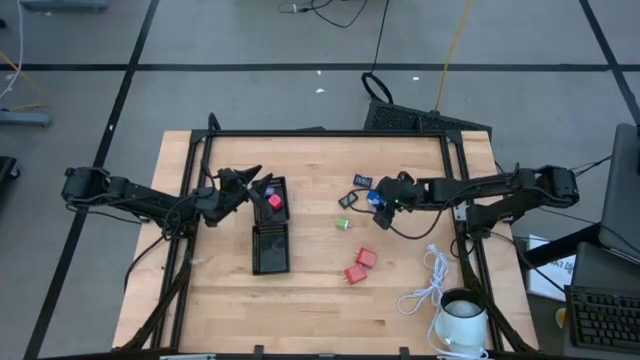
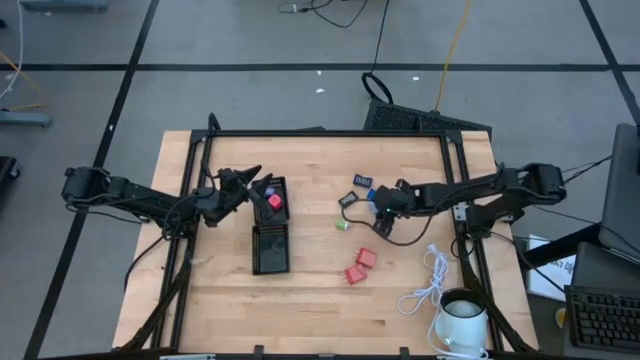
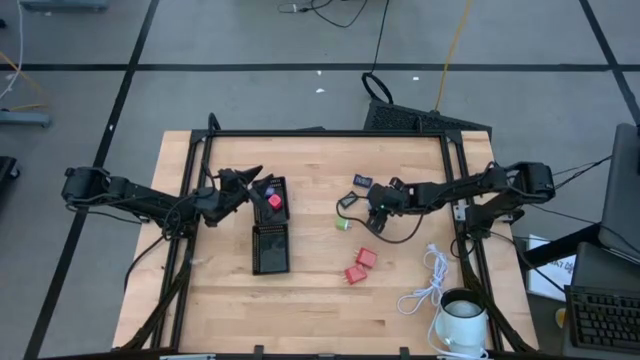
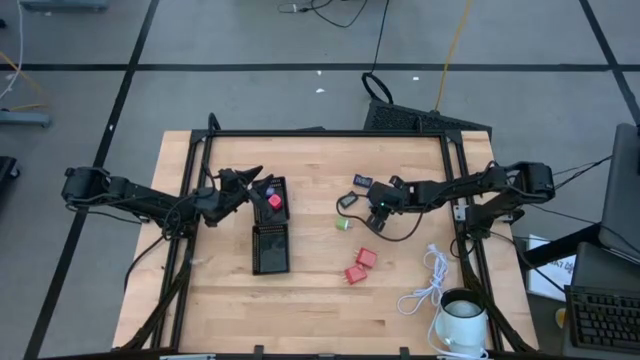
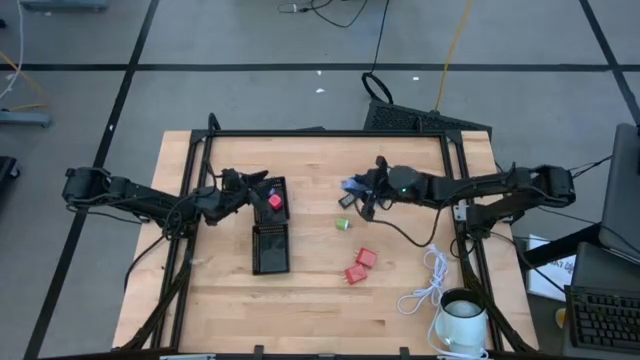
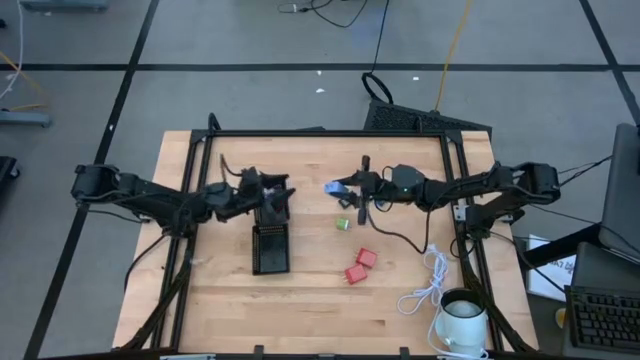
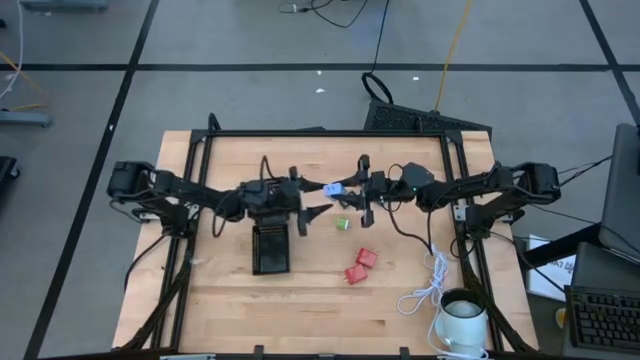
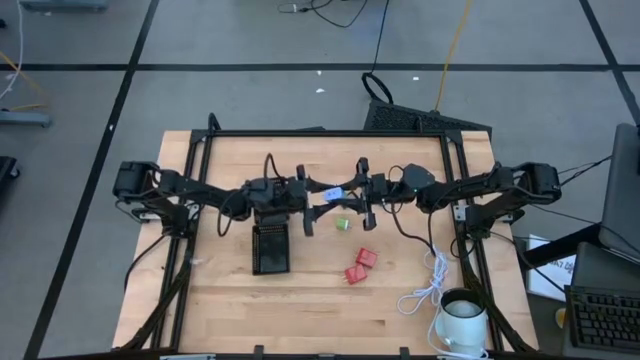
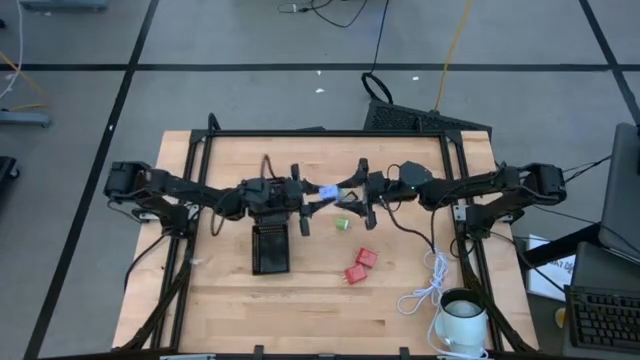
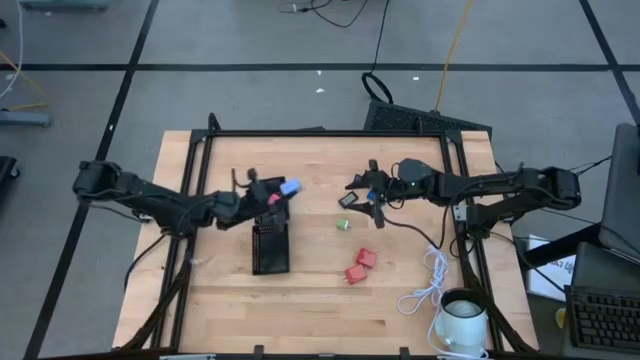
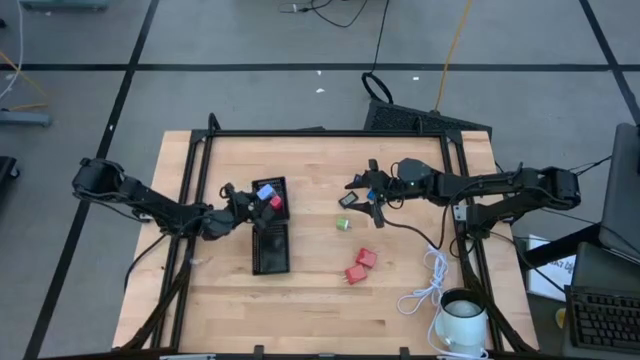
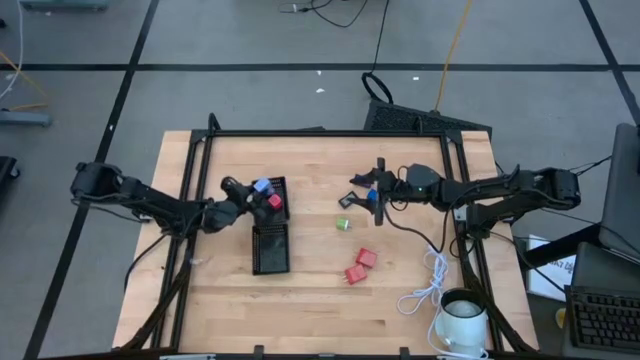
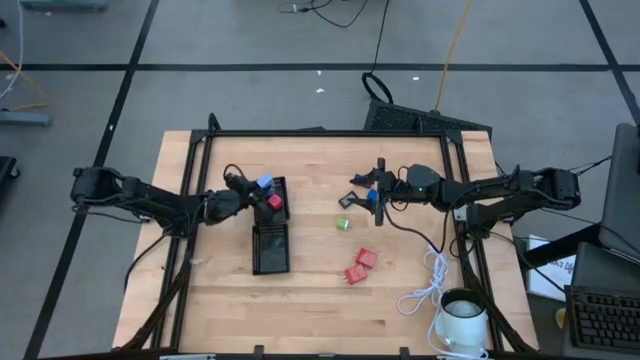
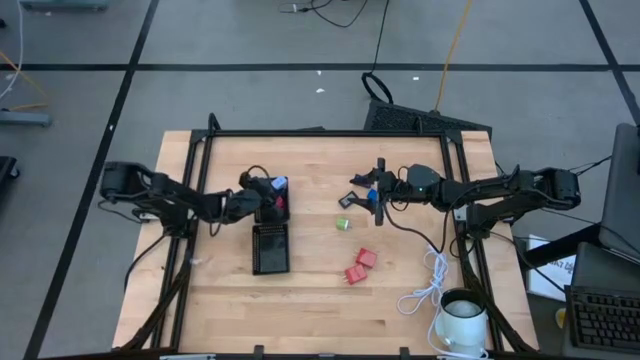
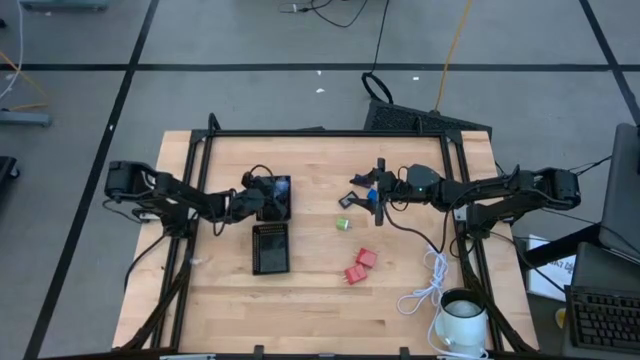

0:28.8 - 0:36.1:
Task: Pick & Place Office items
Put the light blue charger adapter into the top black bin

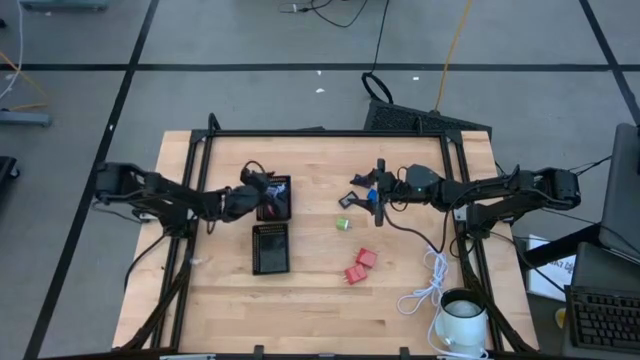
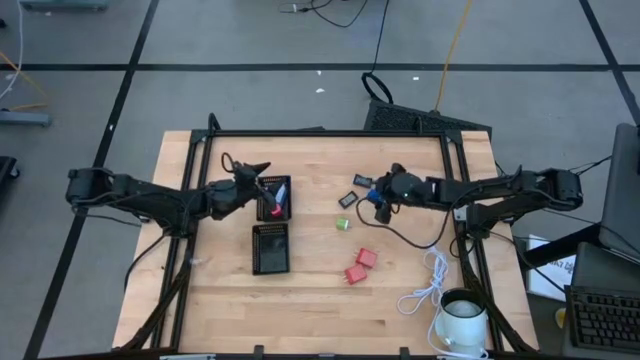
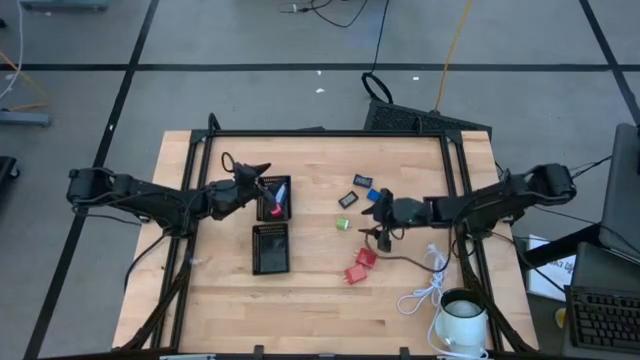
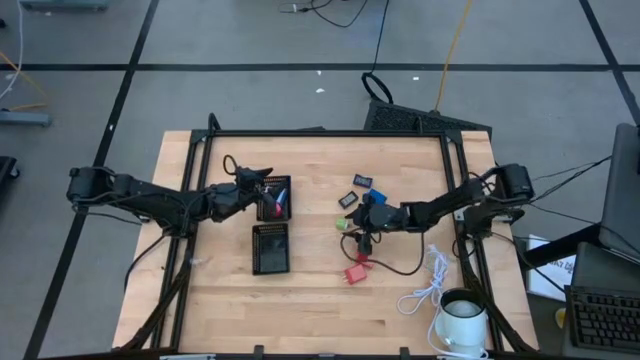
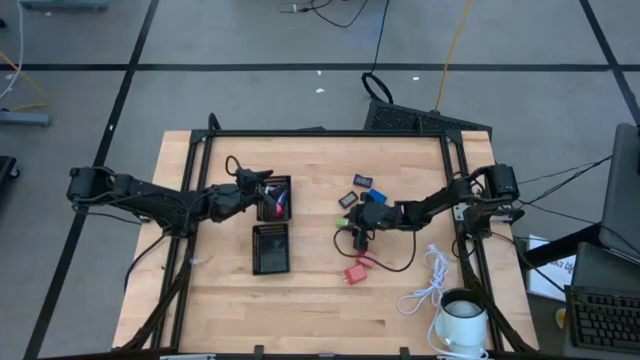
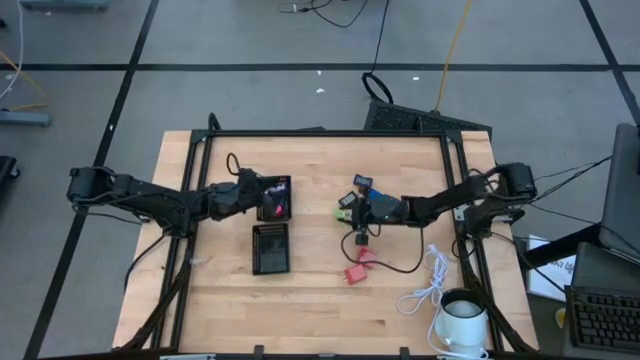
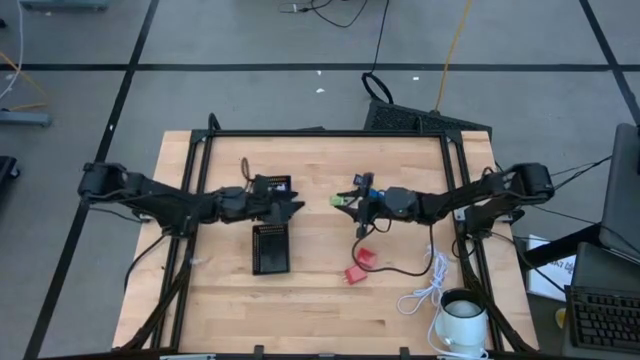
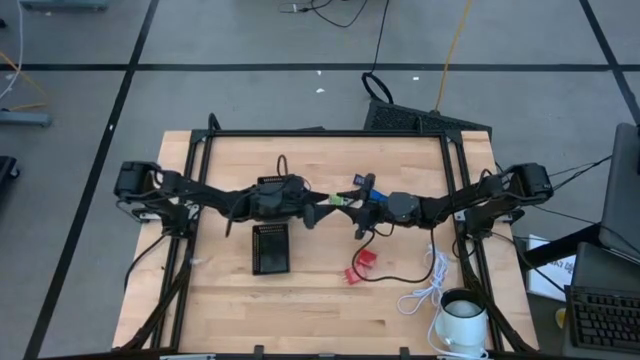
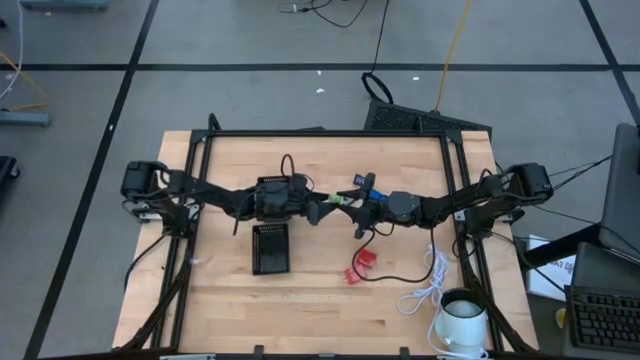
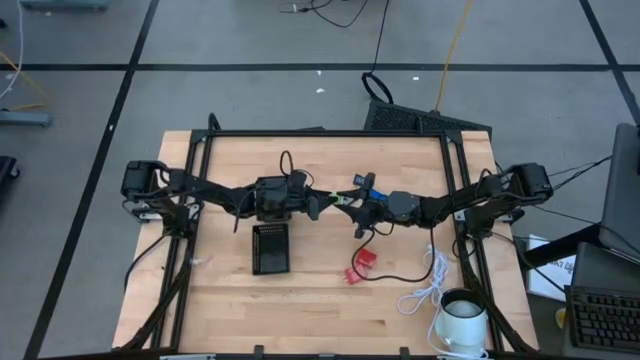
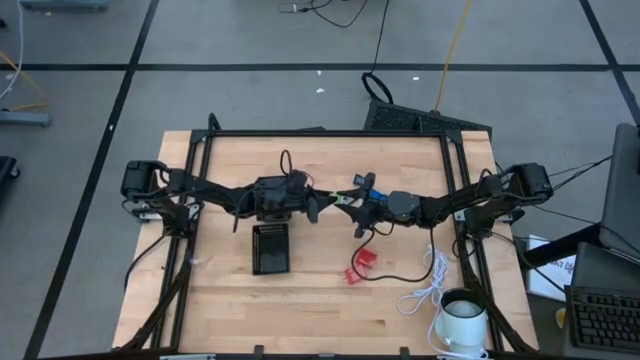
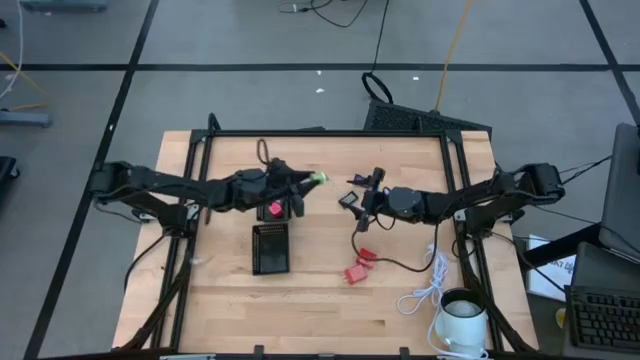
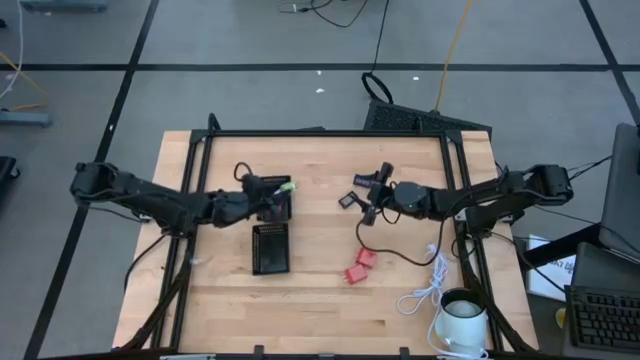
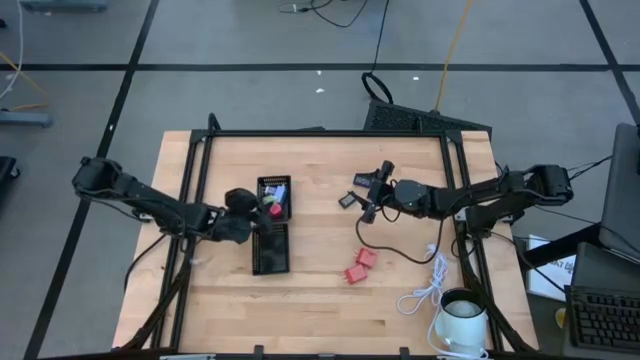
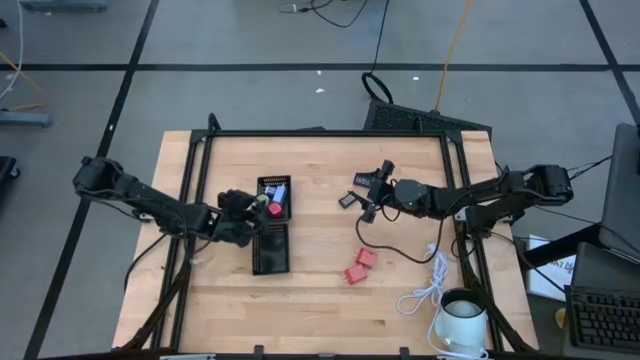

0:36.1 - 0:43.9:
Put the green white charger adapter into the top black bin

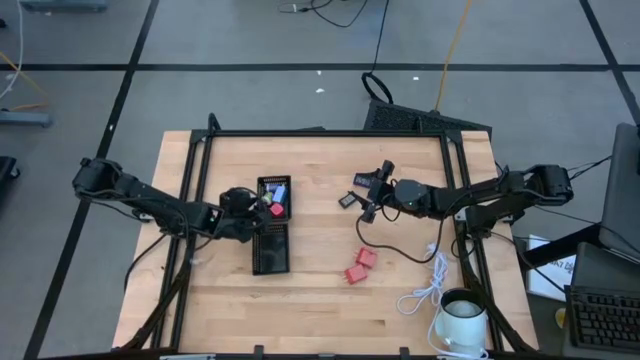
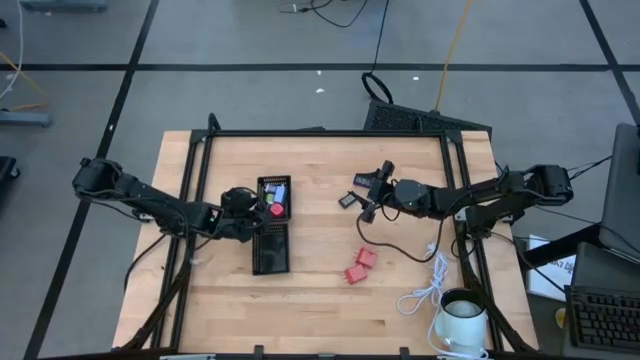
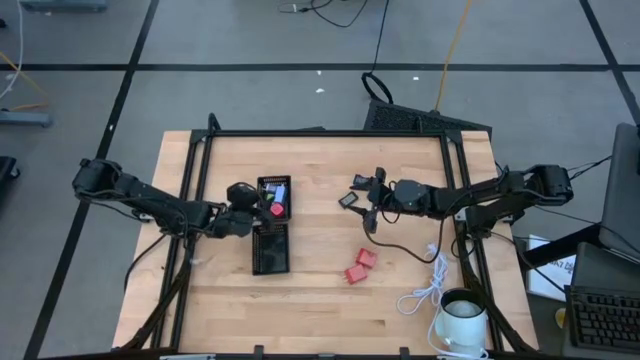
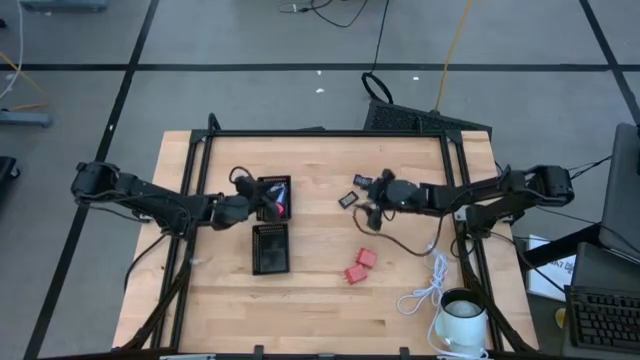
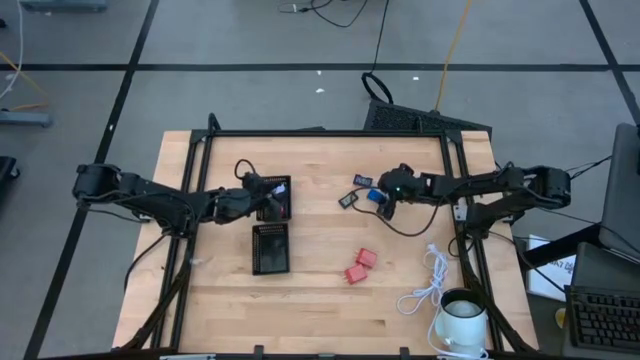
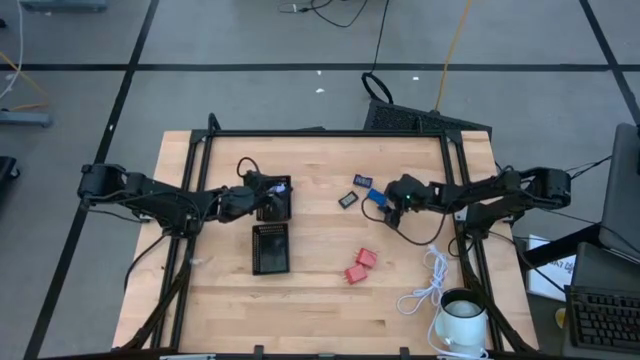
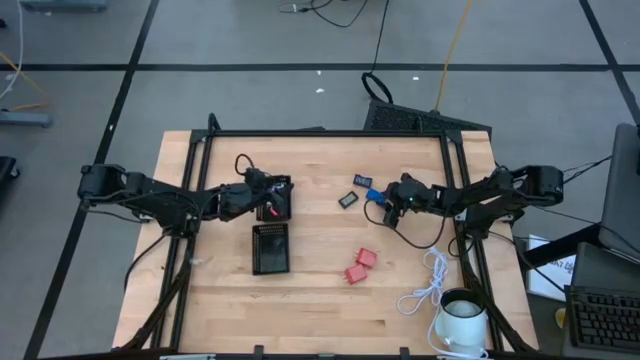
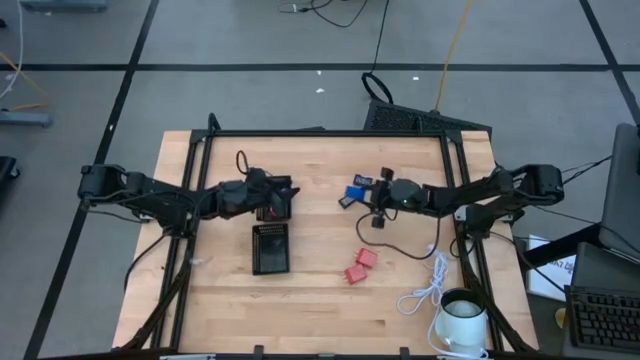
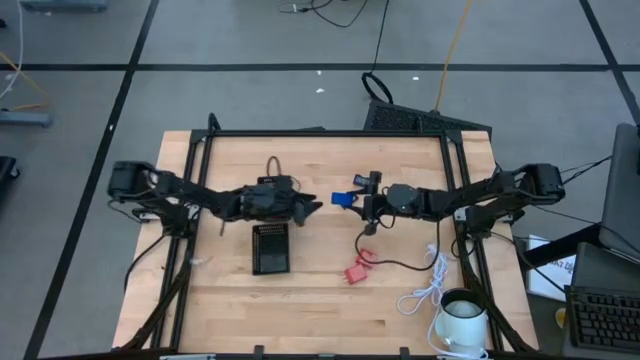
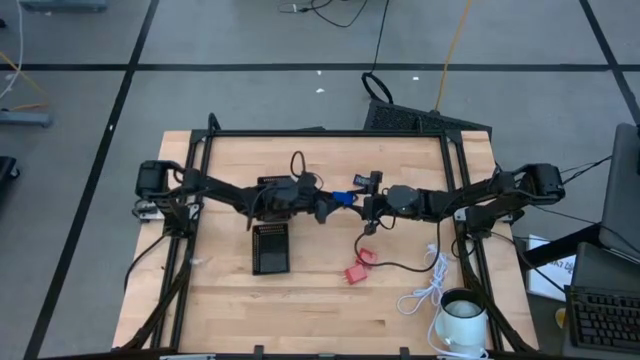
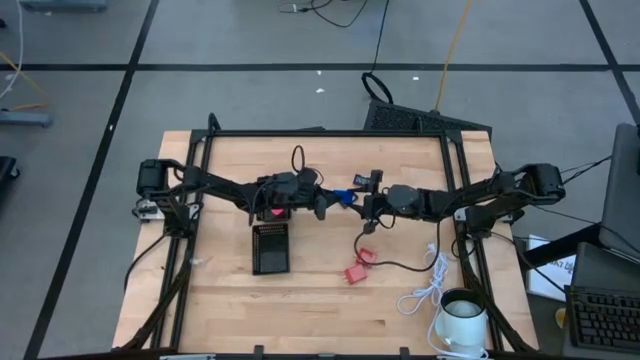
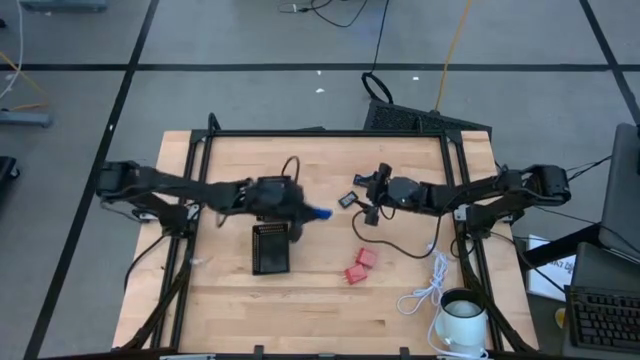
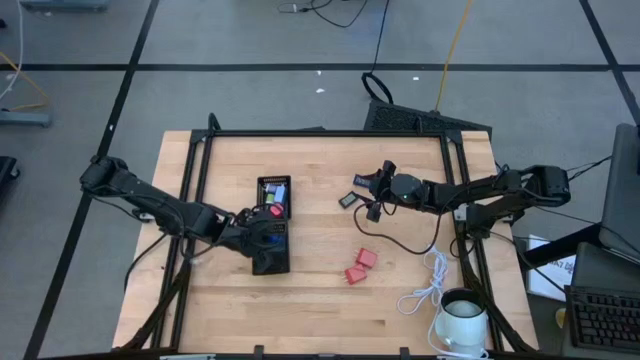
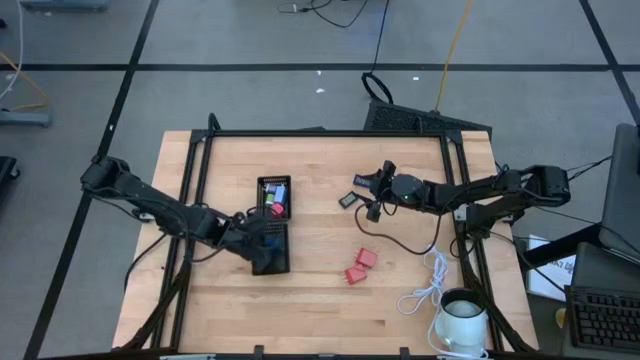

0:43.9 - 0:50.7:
Put the blue timer into the bottom black bin
